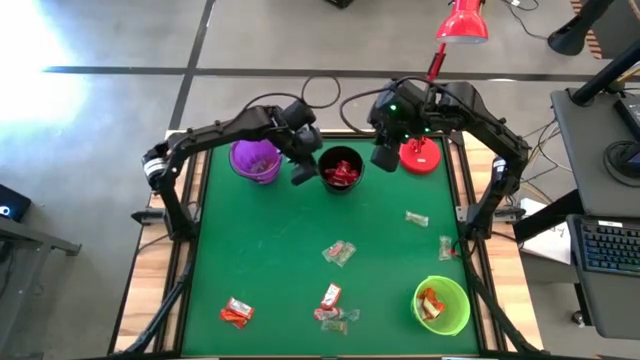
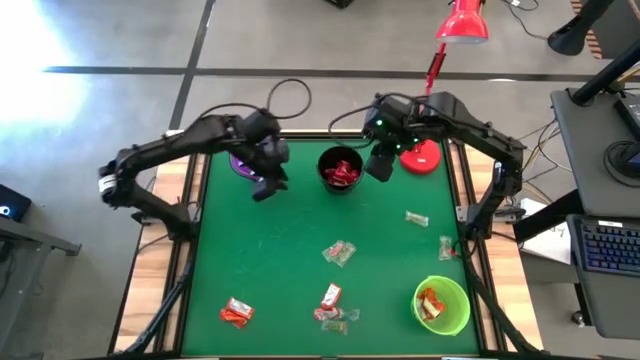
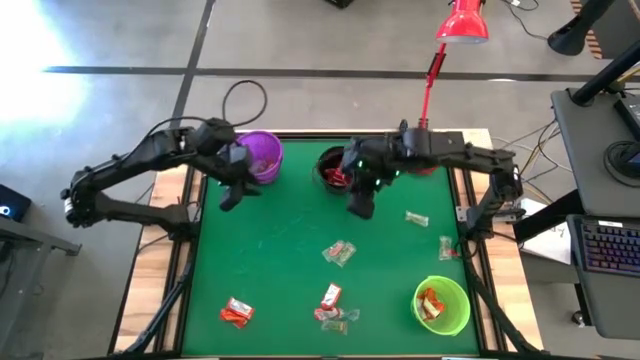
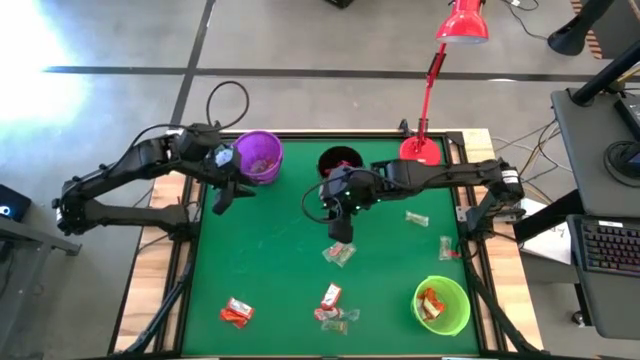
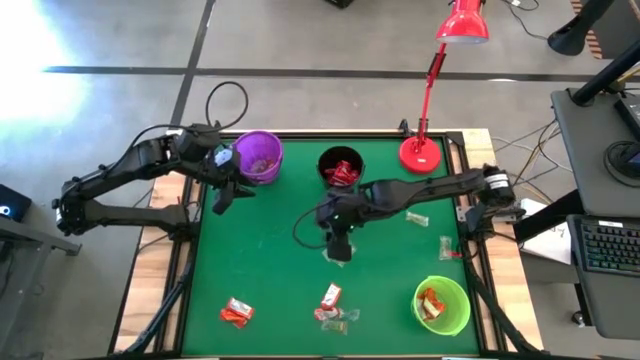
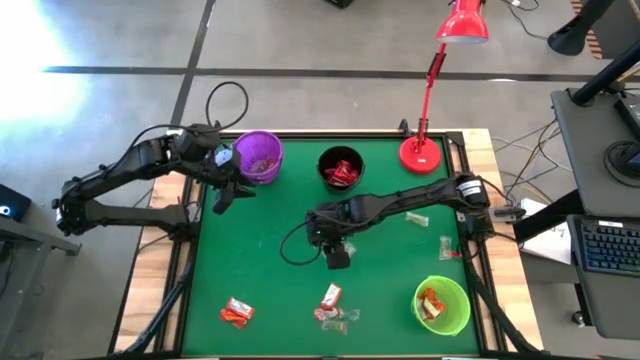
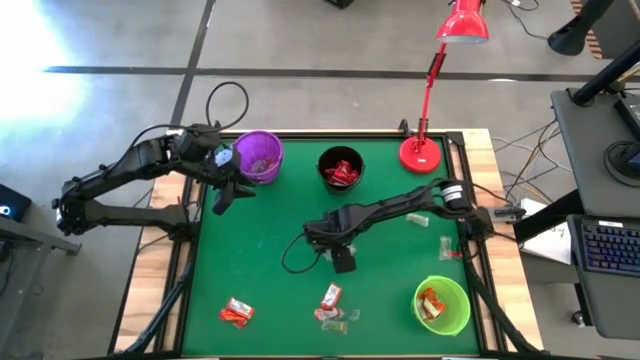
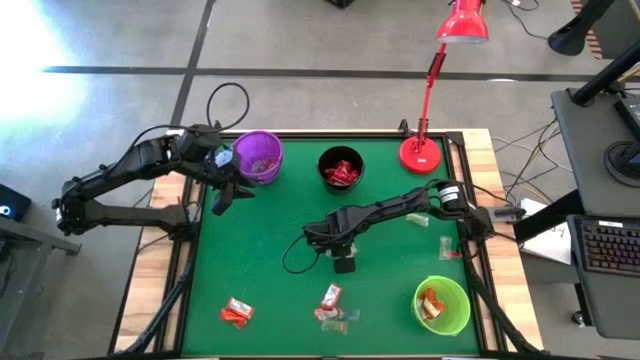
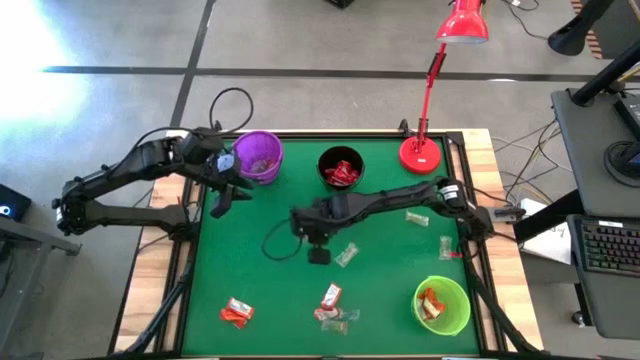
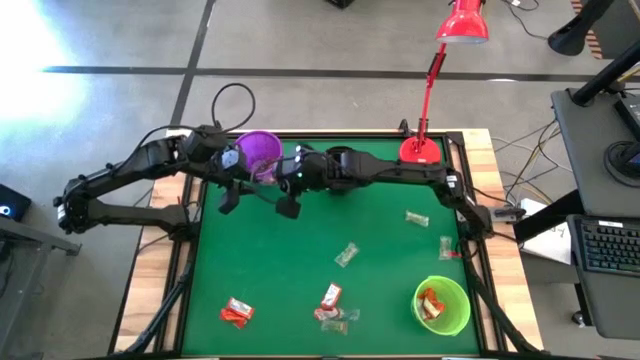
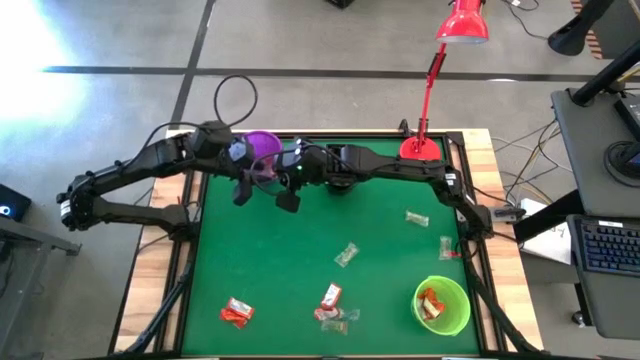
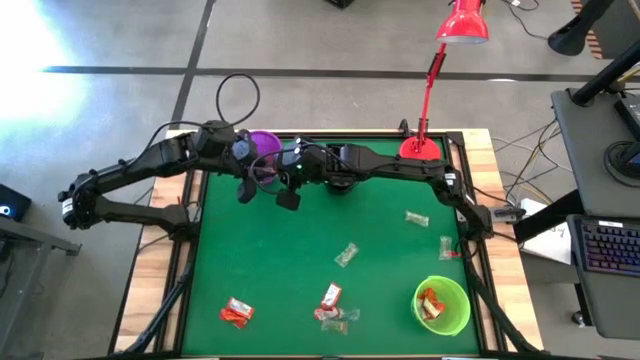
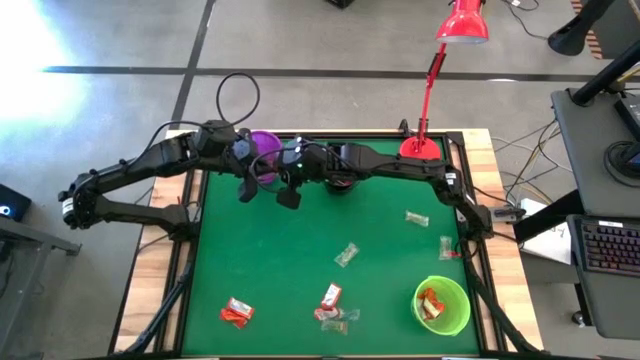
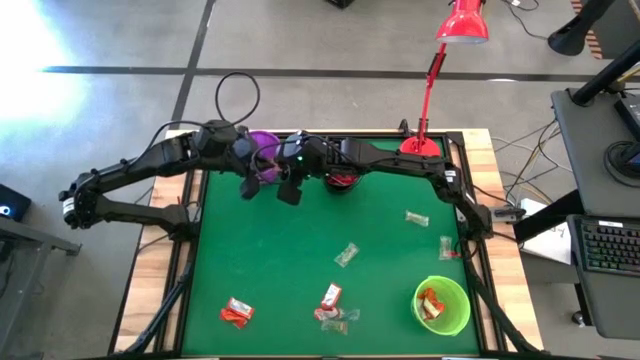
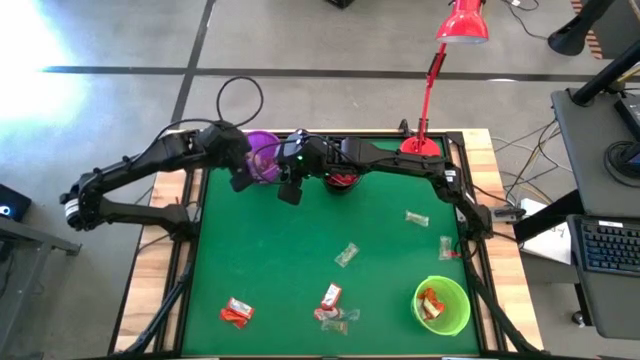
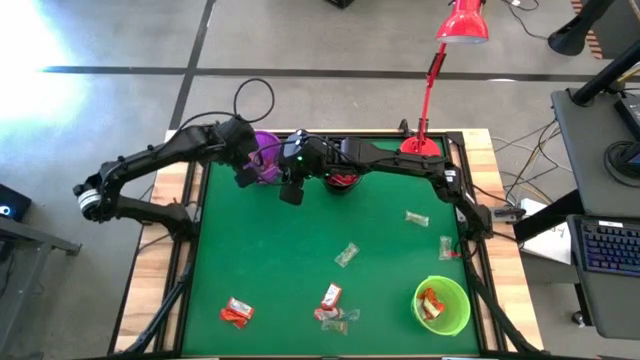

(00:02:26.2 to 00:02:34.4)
Task: Sort candy
Put the orange gummy into the violet bucket

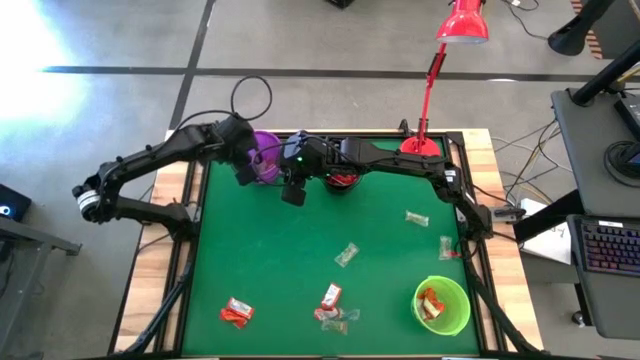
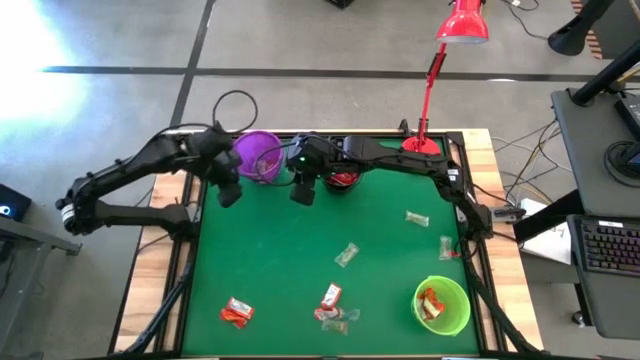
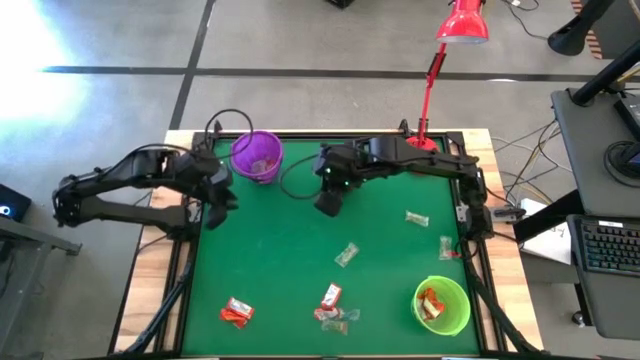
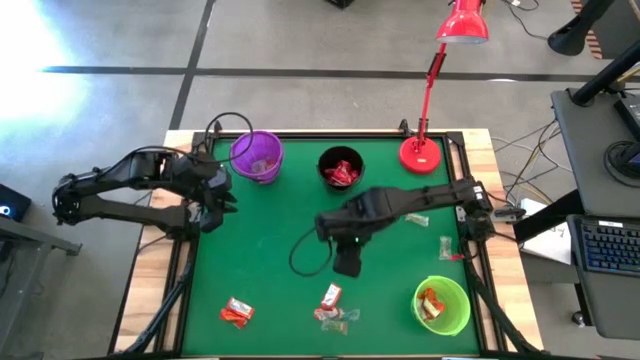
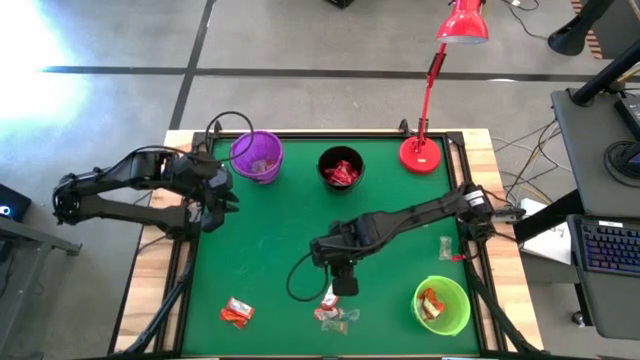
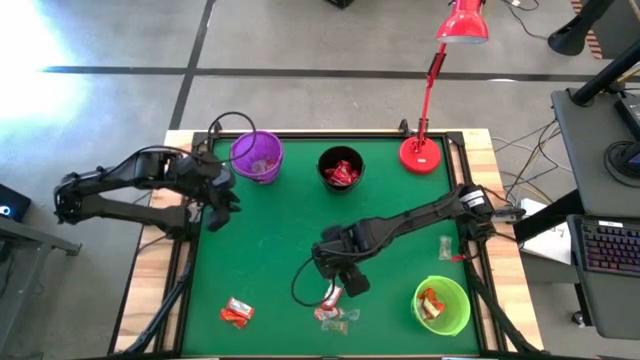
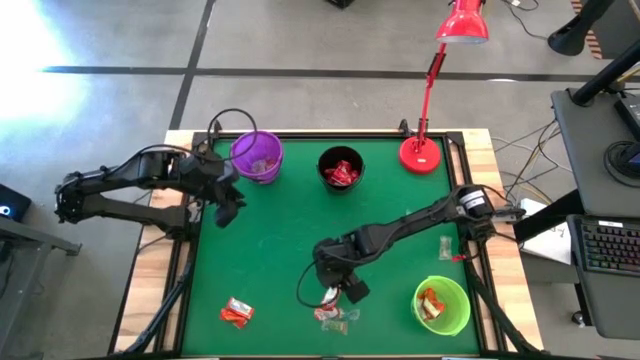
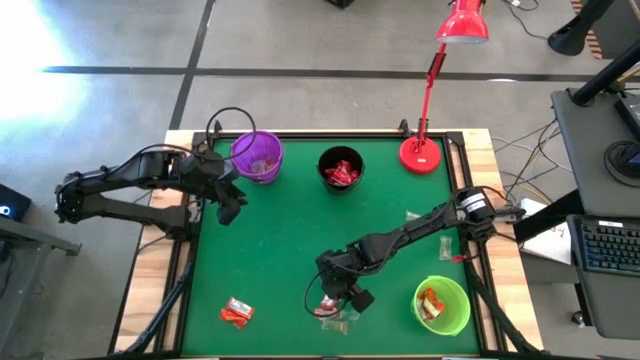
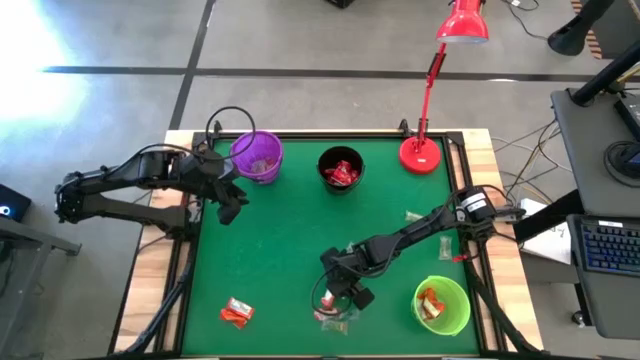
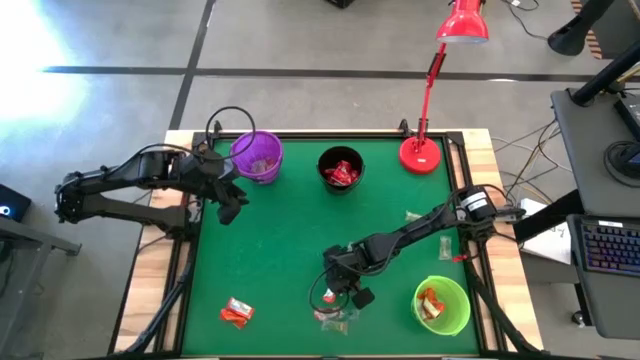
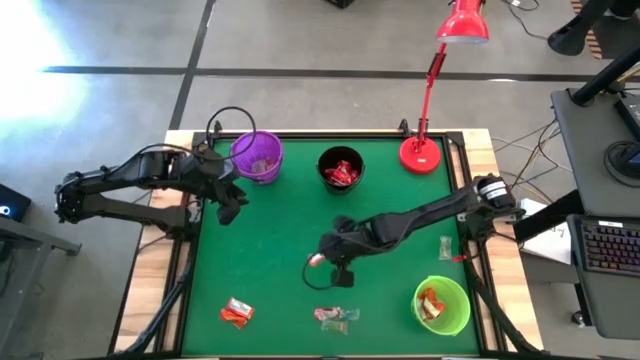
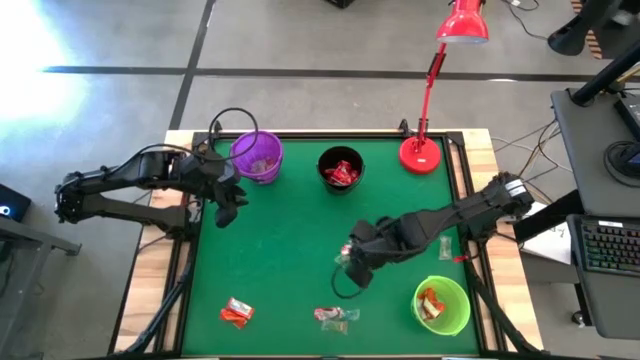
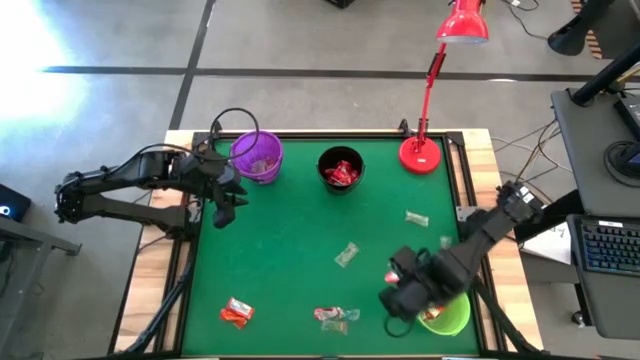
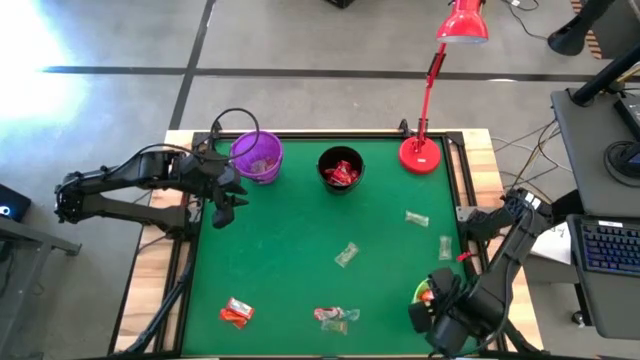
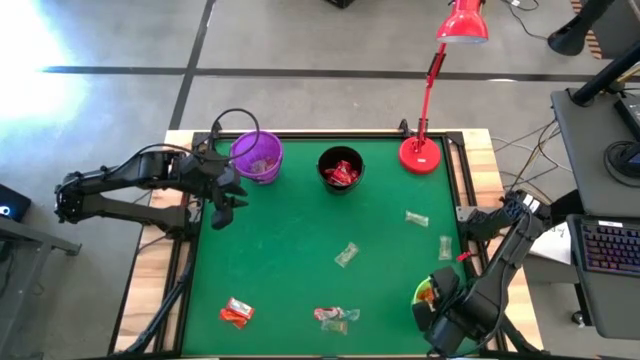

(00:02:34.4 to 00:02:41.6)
Put the orange chocolate into the green bucket

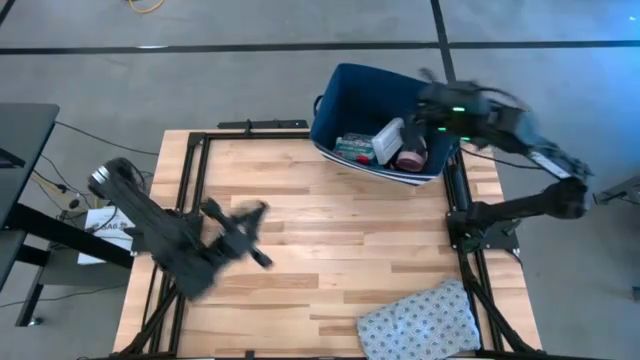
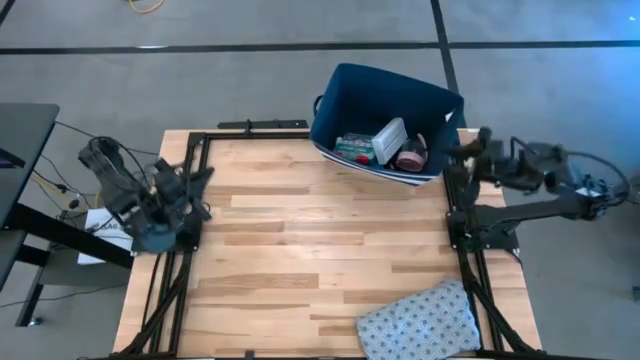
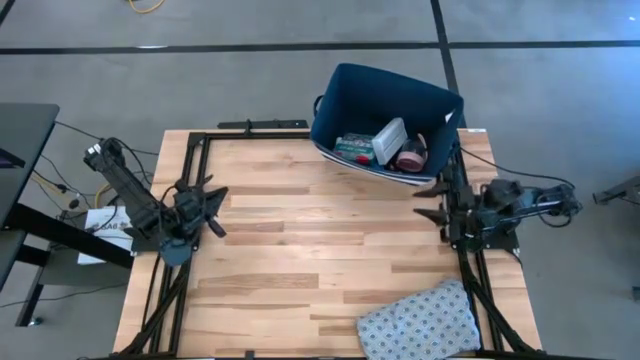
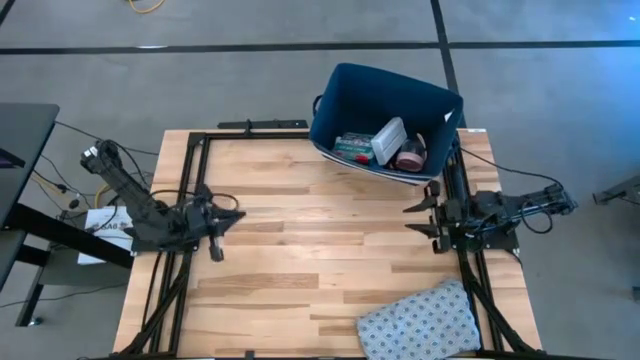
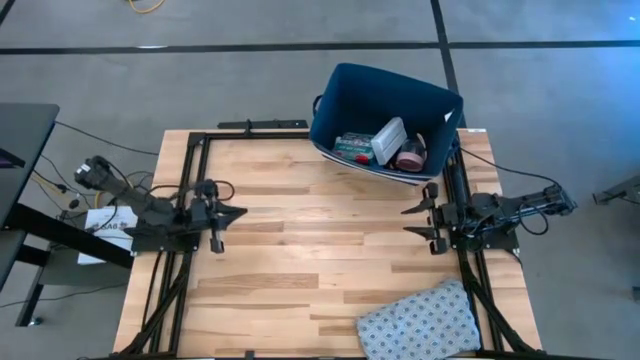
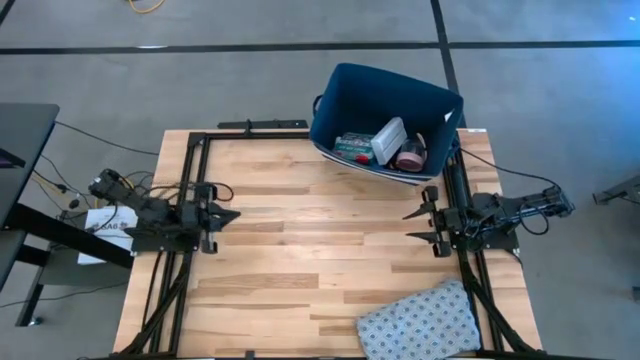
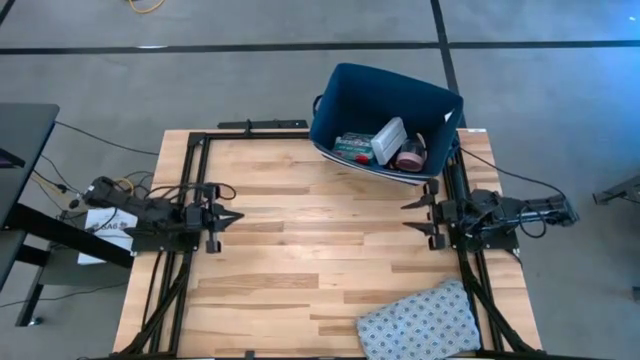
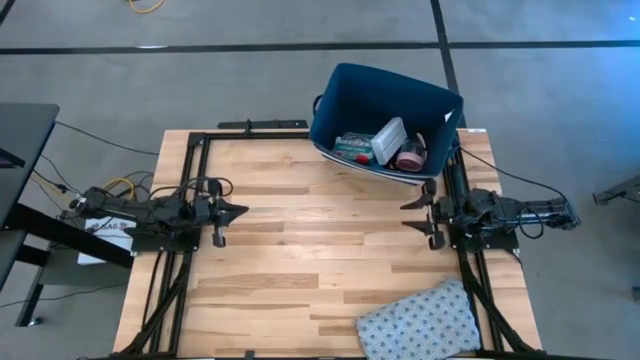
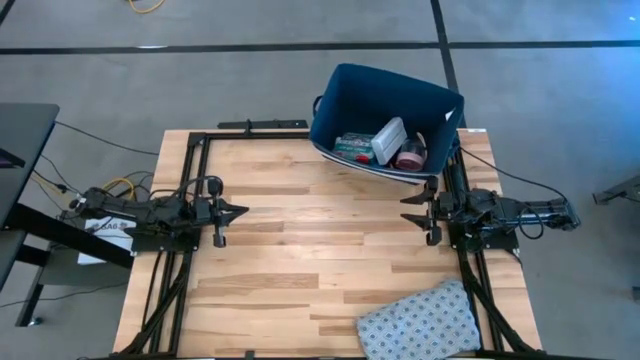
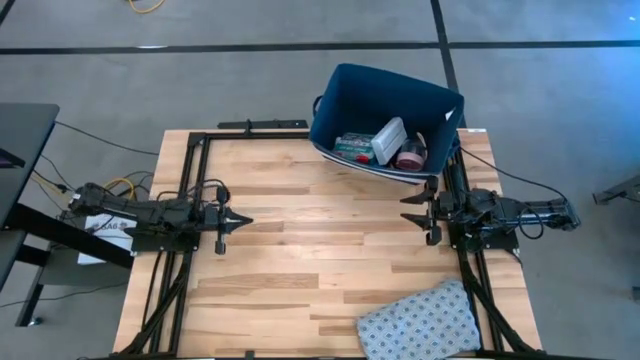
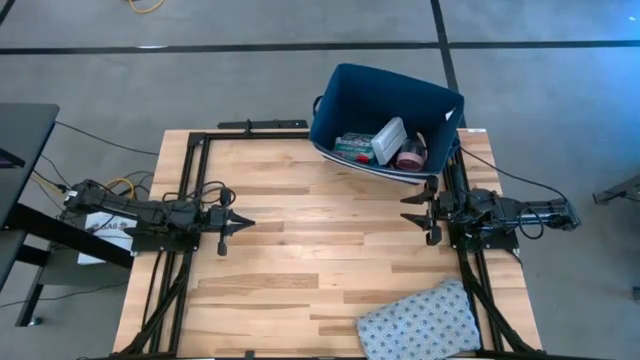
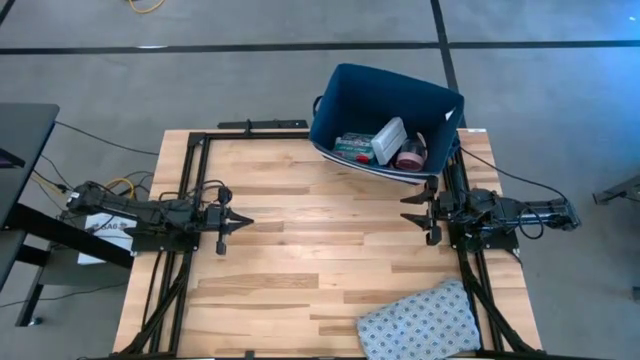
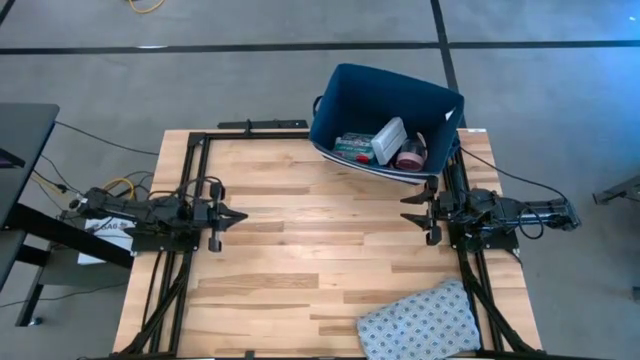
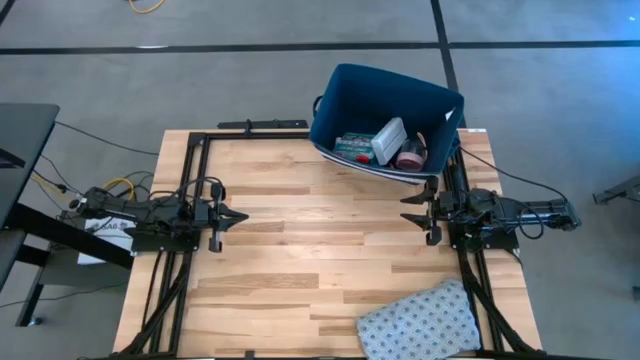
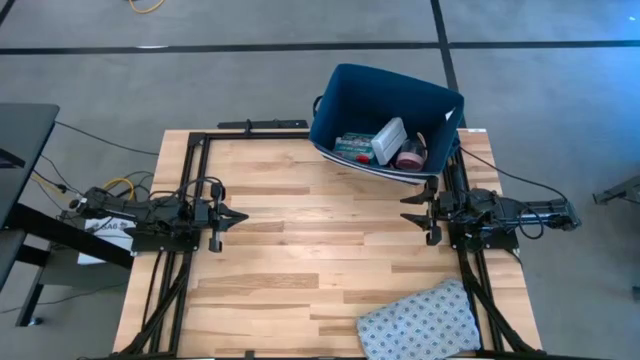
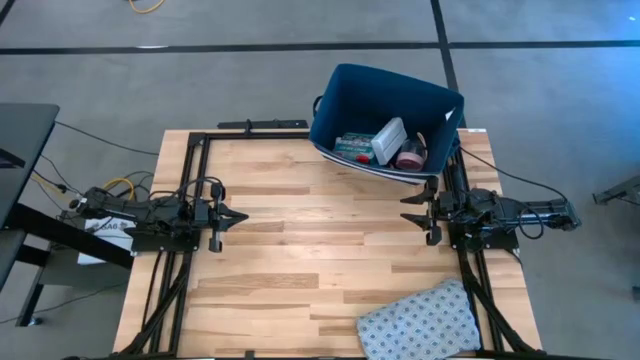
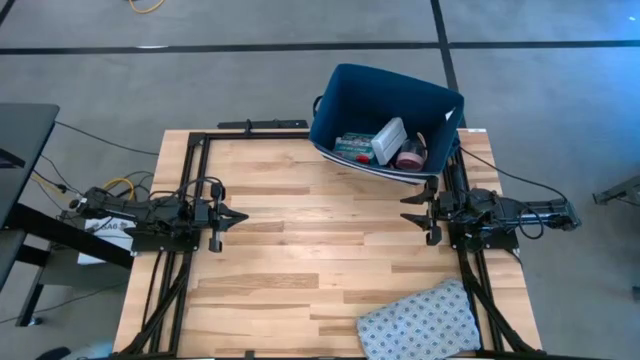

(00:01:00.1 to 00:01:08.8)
Task: Pick & place medical supplies in basket/bin
Return to Home Position
